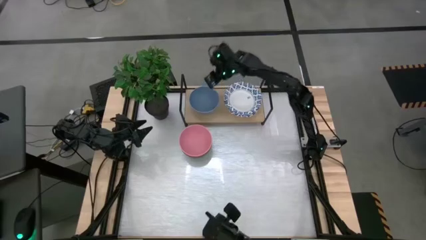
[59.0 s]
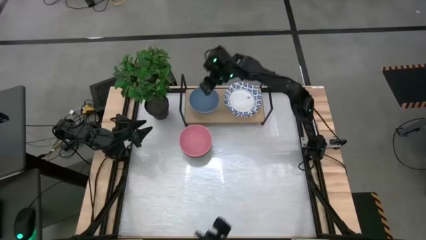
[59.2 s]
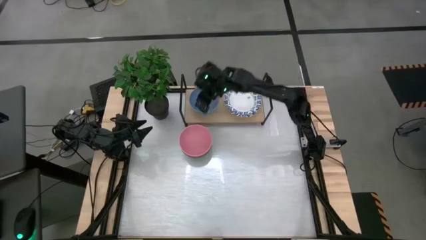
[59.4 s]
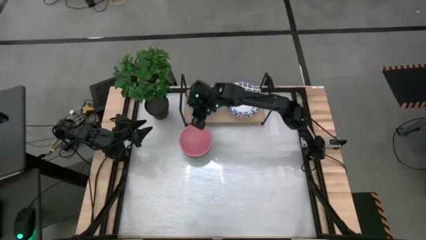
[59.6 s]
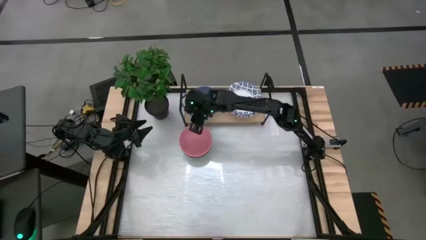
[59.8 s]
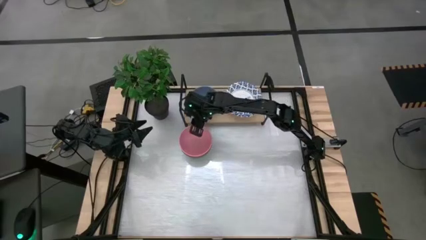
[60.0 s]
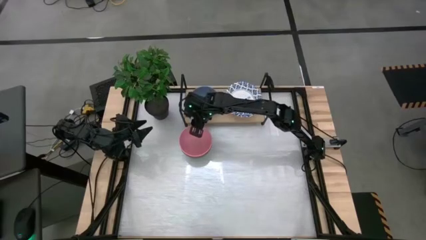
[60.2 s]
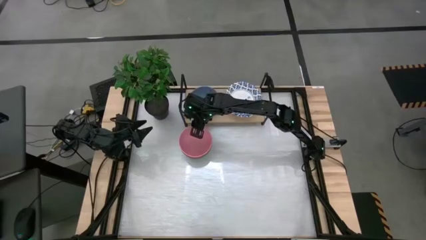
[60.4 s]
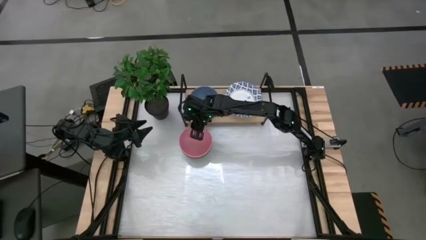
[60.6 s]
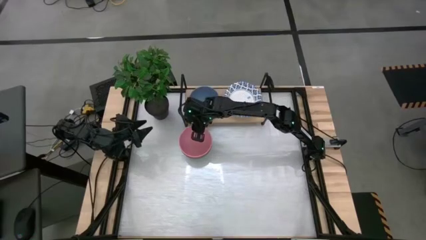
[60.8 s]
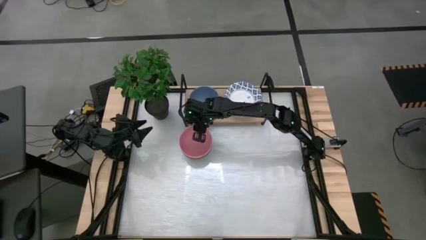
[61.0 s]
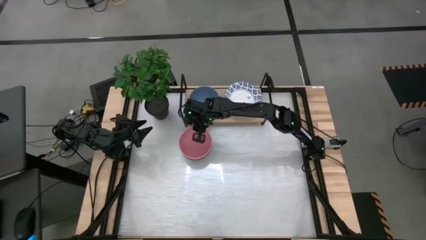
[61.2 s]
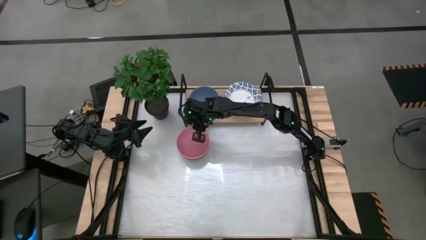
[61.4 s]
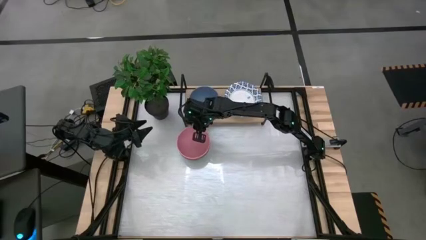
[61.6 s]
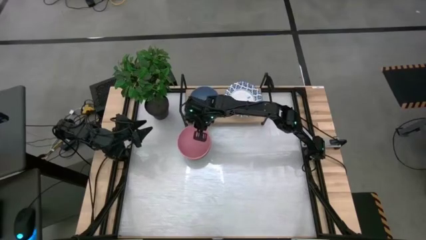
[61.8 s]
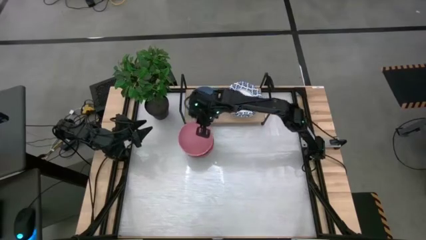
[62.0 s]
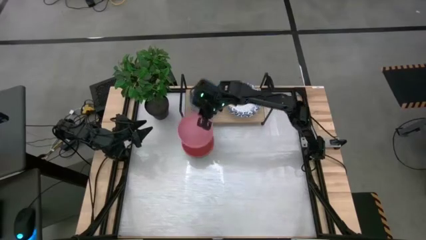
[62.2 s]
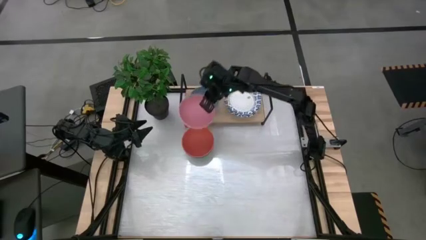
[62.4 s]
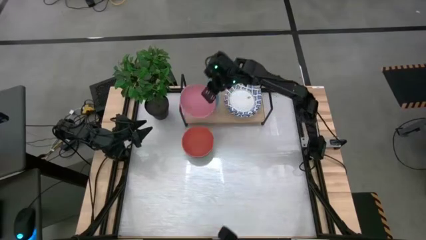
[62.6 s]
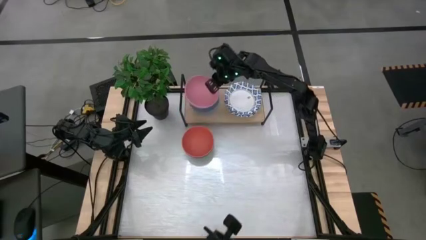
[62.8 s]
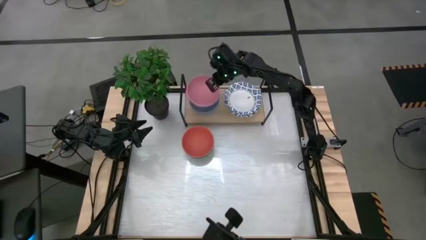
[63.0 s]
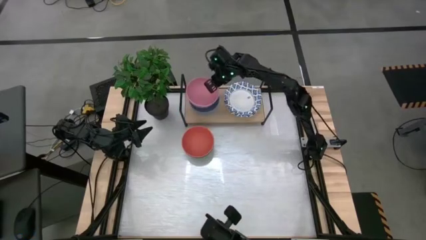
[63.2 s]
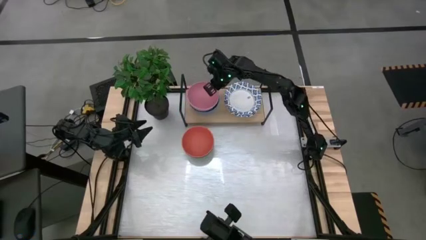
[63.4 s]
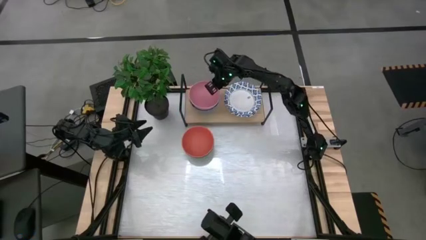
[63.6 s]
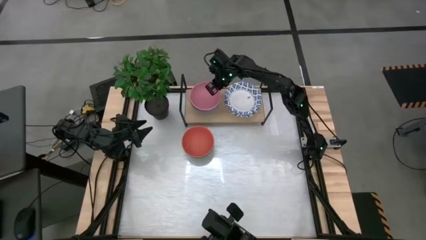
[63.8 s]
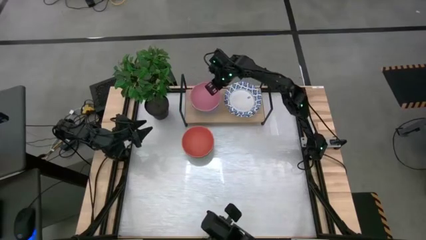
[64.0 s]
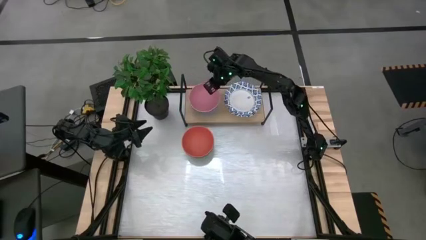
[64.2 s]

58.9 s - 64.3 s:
Task: Place and stack bowls onto a shelf
Stack the pink bowl on top of the blue bowl on the shelf

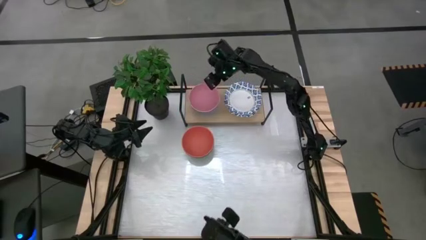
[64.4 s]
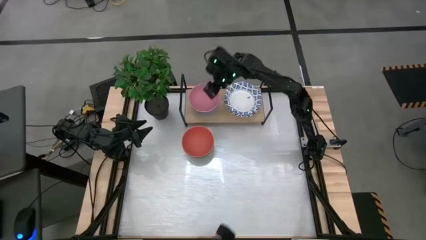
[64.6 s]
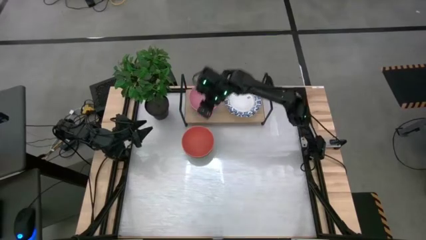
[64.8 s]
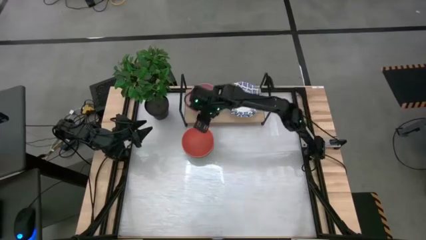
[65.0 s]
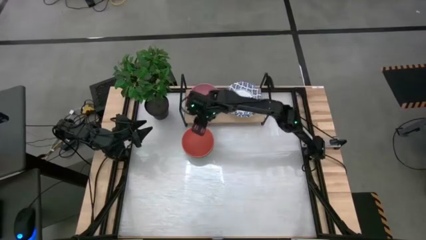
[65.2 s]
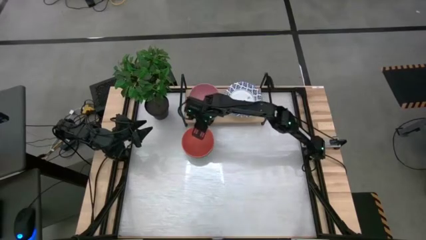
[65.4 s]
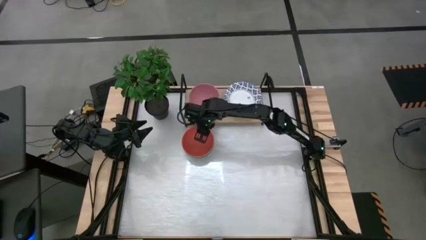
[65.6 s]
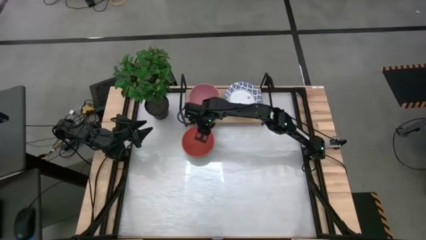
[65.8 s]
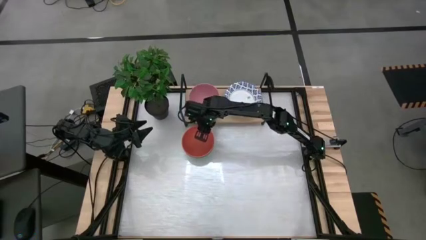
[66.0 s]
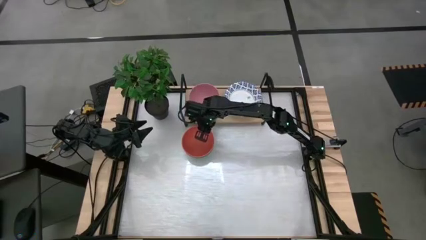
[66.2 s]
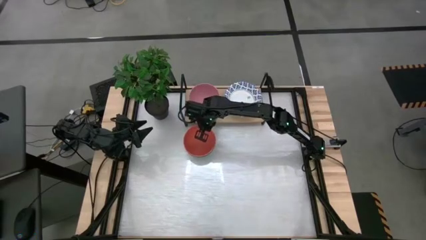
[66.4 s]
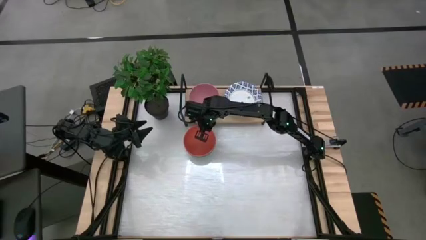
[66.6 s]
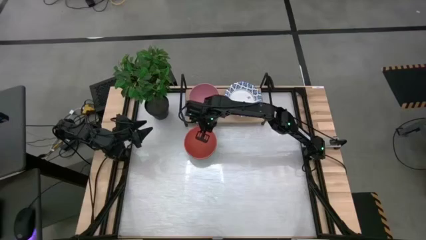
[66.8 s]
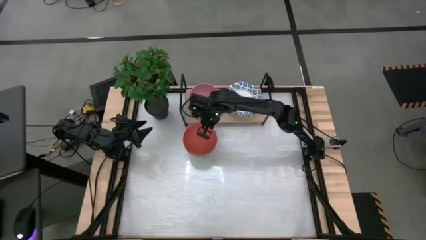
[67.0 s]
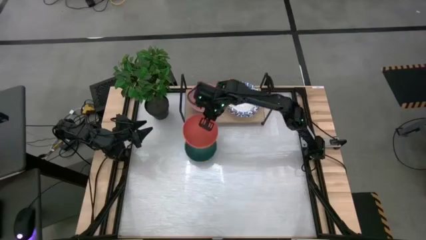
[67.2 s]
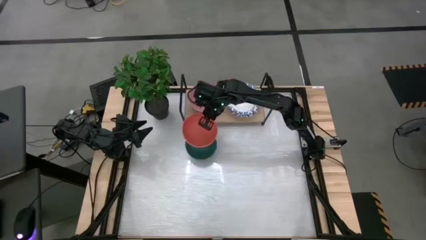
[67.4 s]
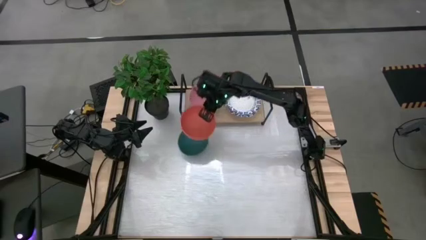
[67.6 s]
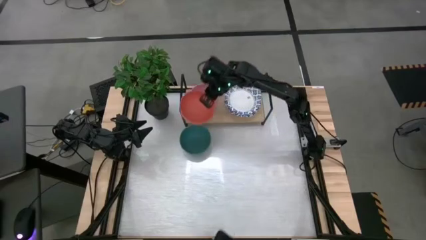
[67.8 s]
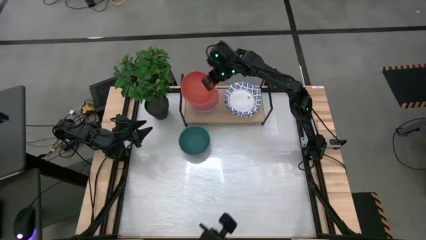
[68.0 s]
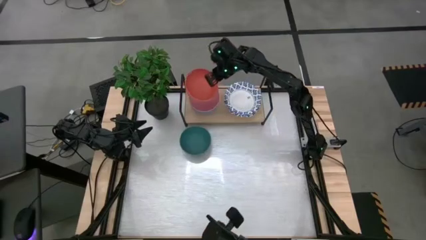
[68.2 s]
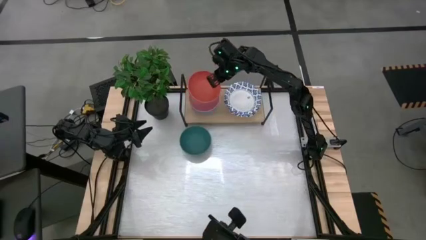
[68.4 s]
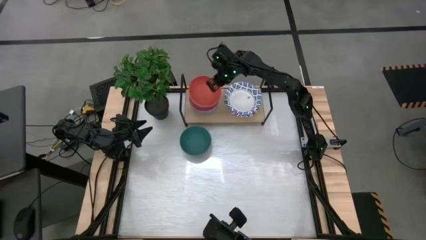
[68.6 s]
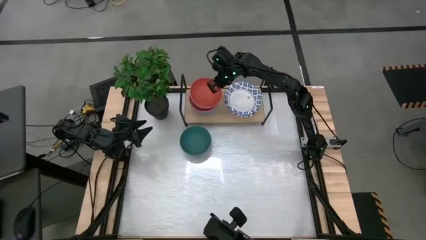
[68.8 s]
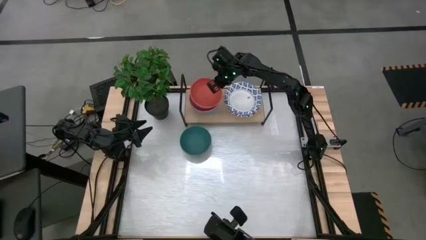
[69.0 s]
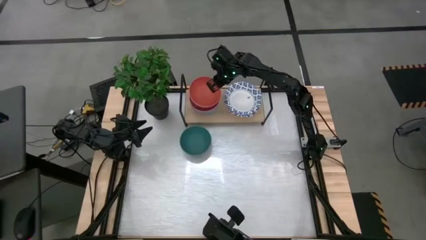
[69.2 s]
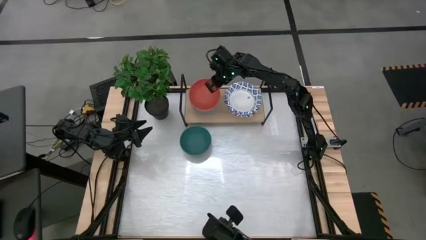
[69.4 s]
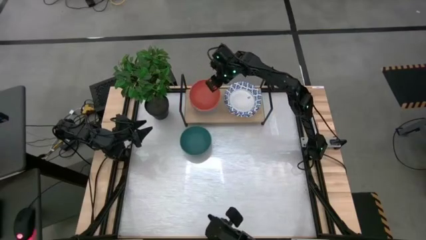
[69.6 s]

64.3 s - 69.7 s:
Stack the orange bowl on top of the pink bowl on the shelf

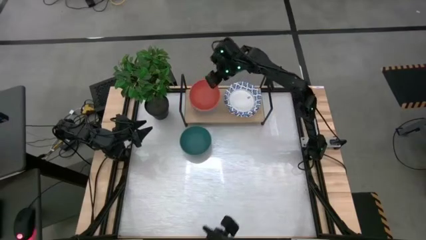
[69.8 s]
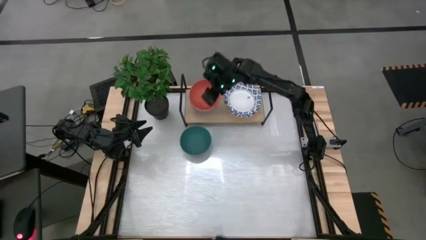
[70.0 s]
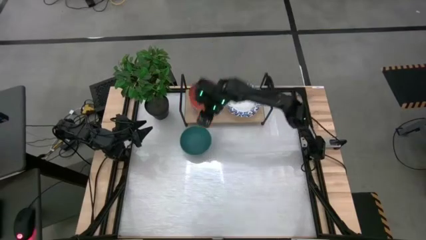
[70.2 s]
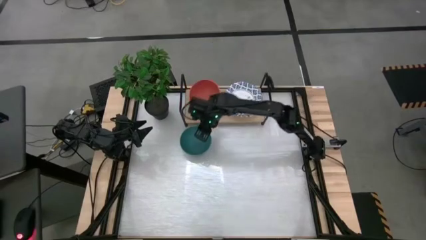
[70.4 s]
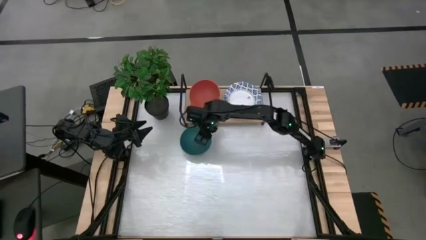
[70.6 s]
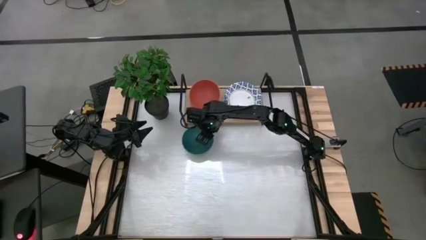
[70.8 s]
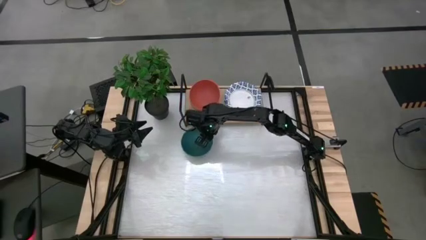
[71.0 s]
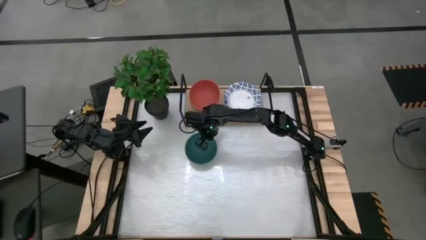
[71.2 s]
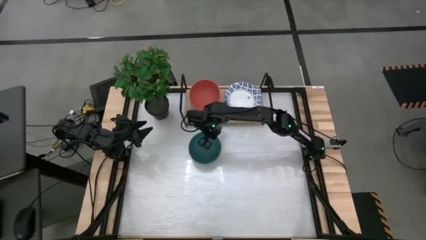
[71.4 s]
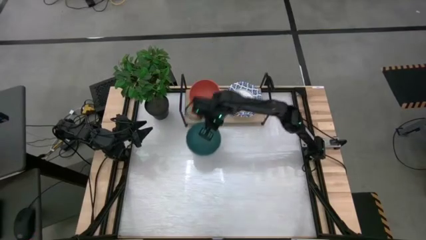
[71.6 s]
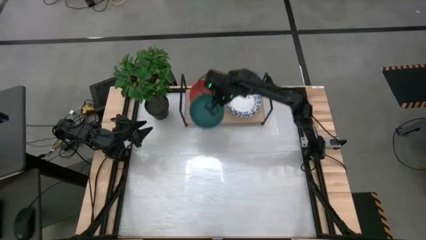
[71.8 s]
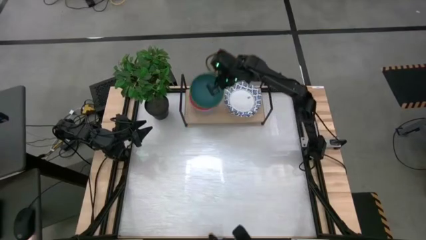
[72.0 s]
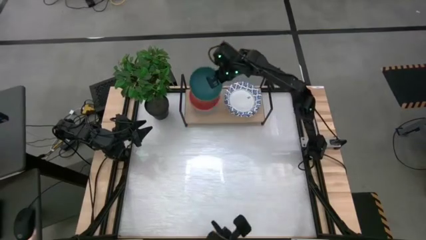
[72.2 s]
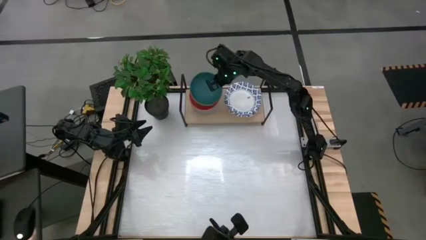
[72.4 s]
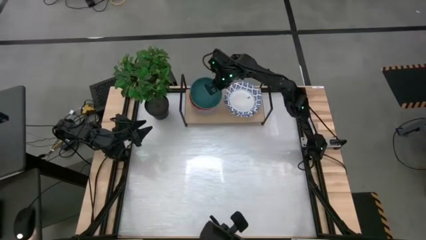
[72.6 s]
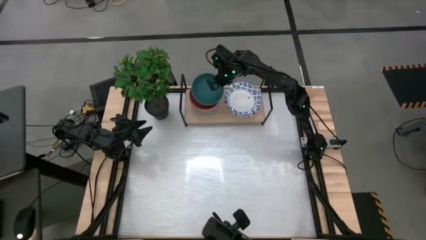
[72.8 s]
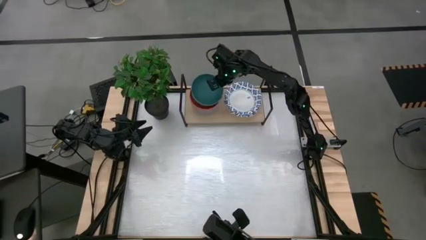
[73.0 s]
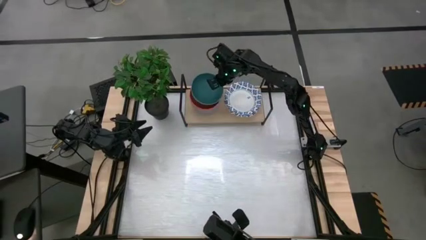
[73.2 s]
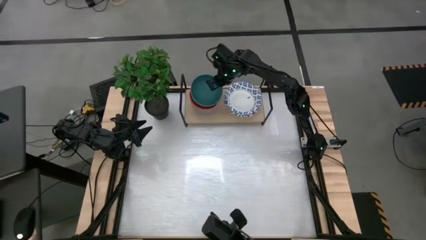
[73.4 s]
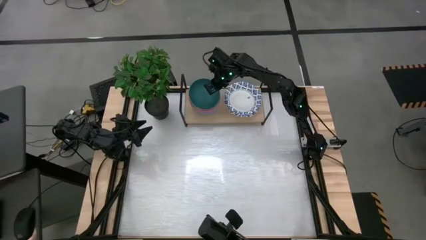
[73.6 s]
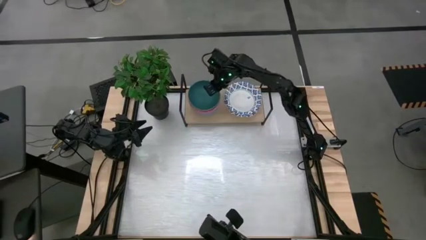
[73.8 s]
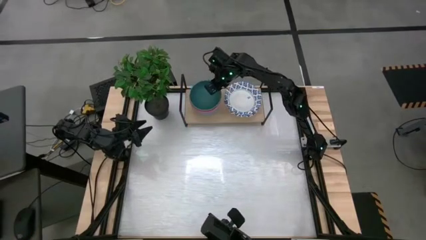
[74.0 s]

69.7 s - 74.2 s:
Stack the green bowl on top of the orange bowl on the shelf
